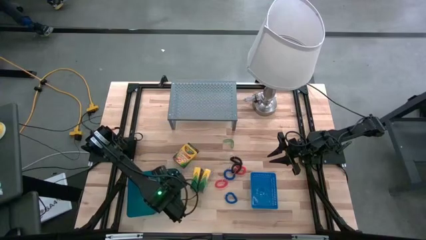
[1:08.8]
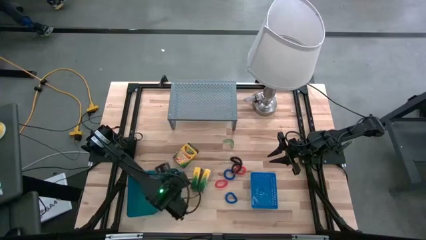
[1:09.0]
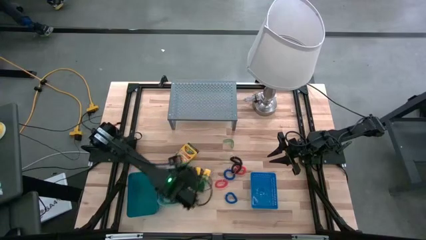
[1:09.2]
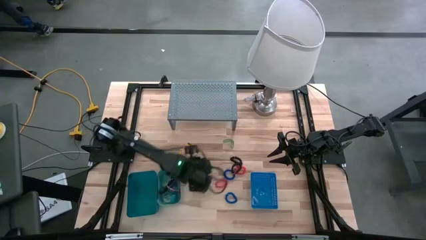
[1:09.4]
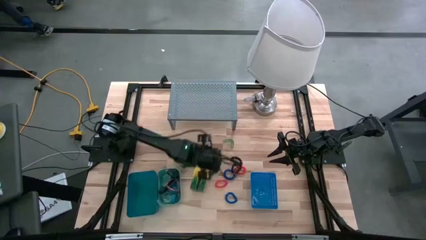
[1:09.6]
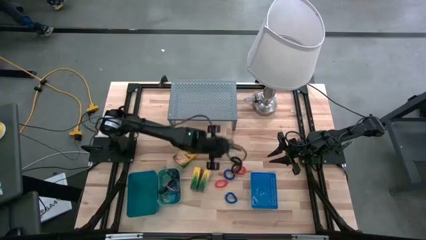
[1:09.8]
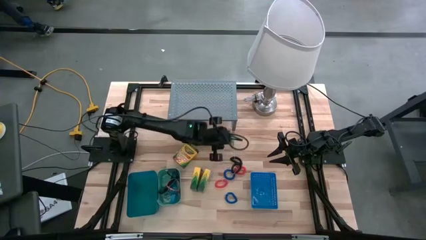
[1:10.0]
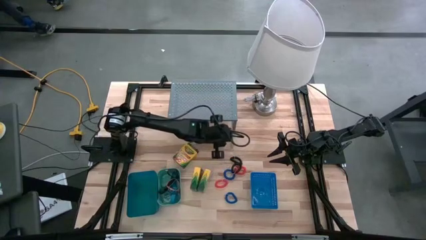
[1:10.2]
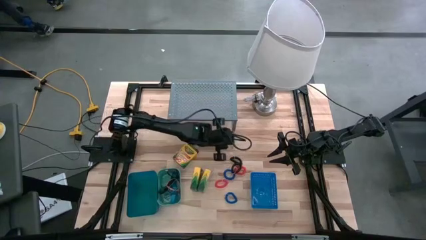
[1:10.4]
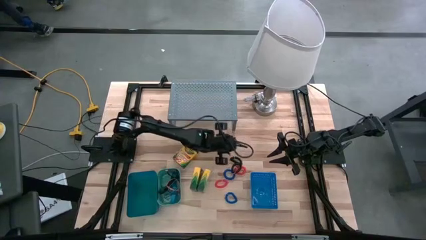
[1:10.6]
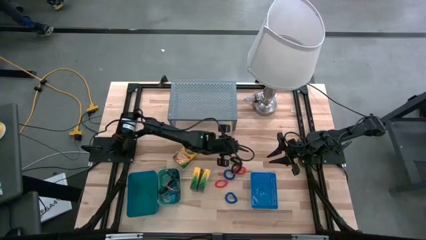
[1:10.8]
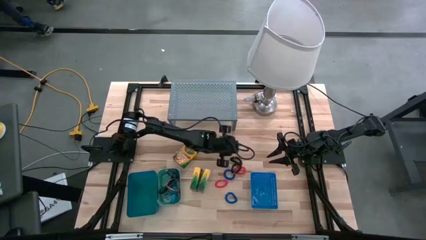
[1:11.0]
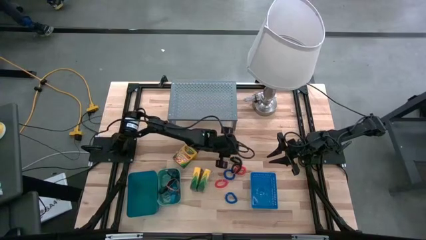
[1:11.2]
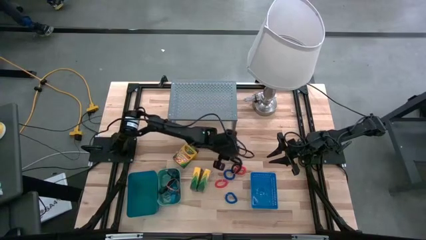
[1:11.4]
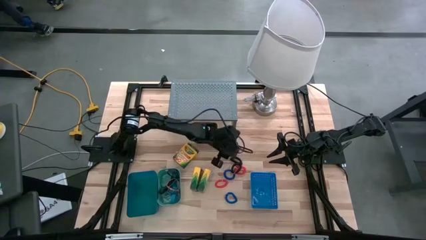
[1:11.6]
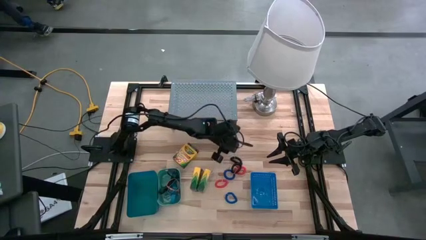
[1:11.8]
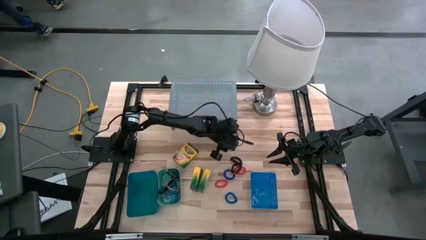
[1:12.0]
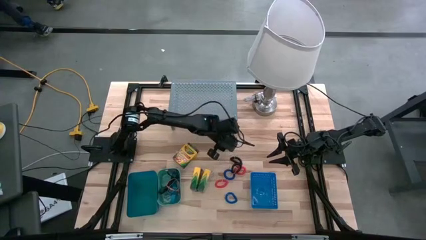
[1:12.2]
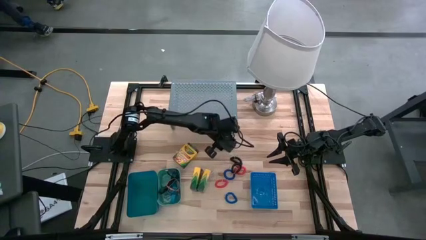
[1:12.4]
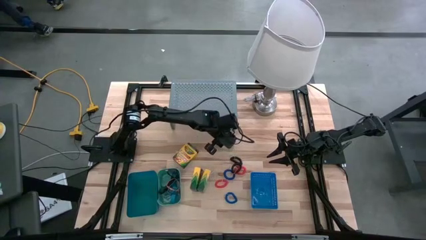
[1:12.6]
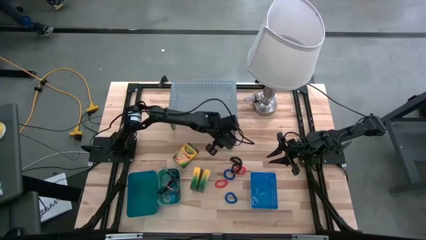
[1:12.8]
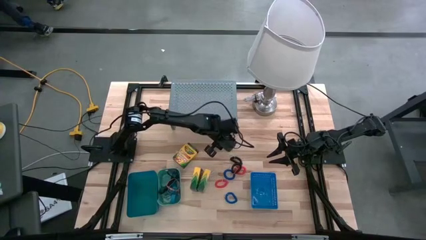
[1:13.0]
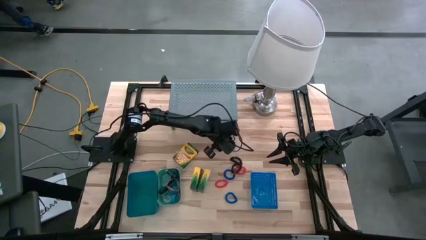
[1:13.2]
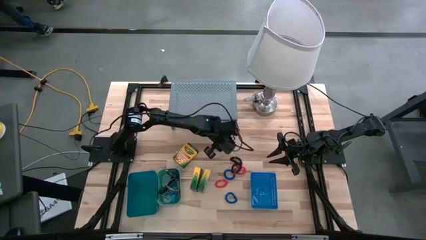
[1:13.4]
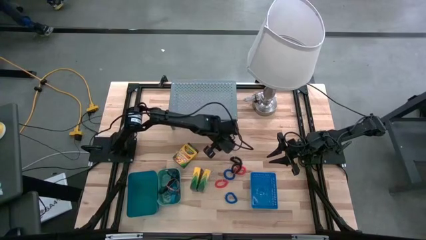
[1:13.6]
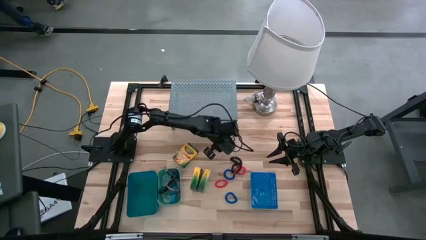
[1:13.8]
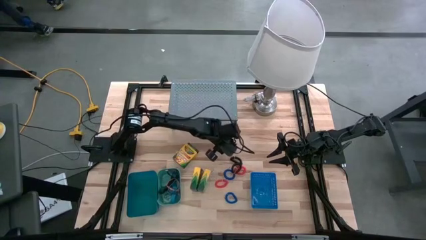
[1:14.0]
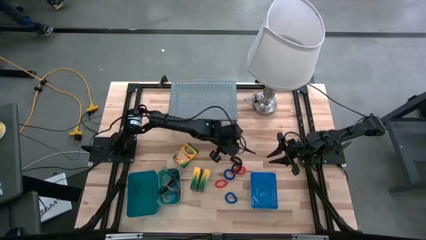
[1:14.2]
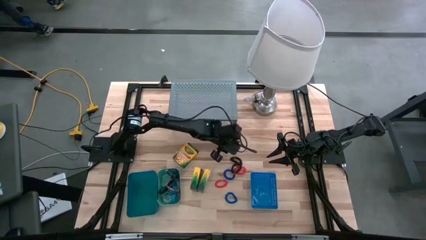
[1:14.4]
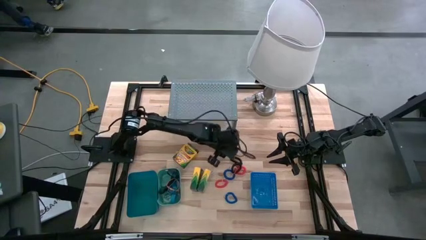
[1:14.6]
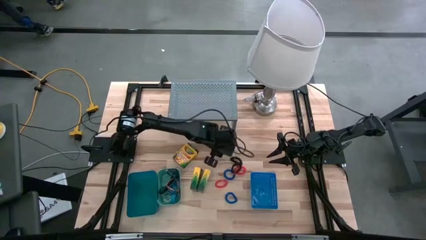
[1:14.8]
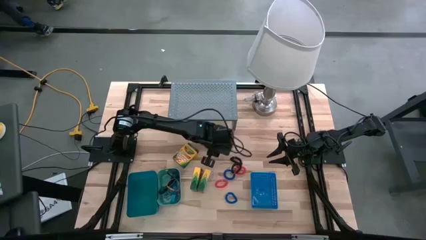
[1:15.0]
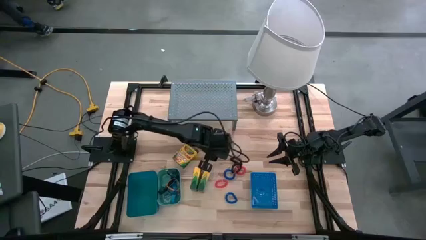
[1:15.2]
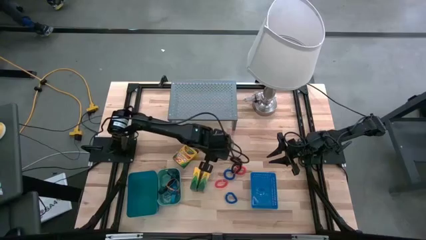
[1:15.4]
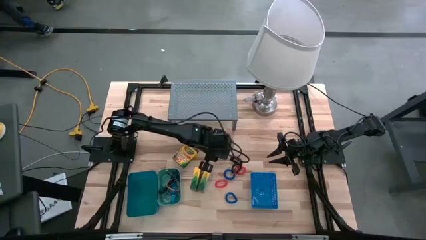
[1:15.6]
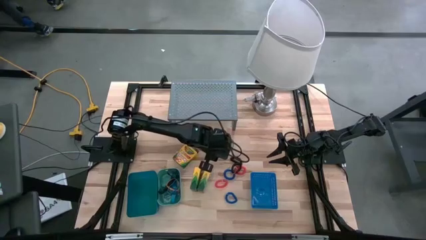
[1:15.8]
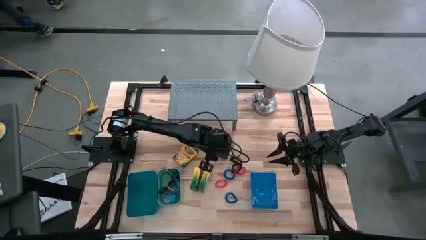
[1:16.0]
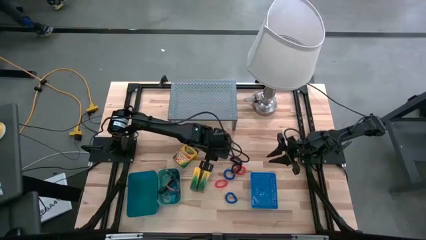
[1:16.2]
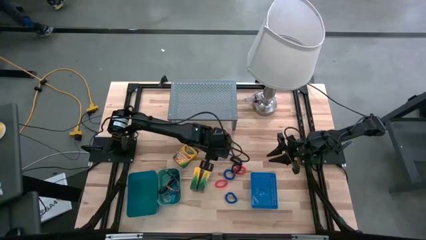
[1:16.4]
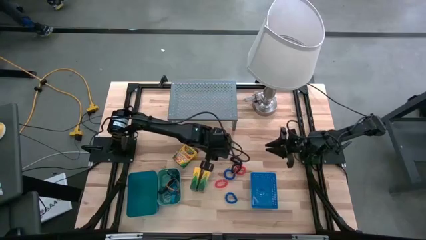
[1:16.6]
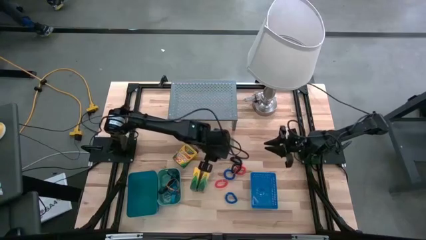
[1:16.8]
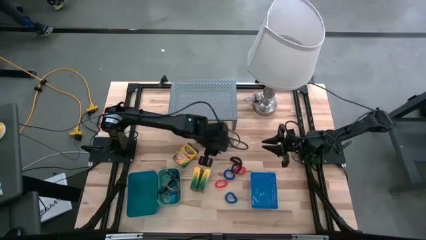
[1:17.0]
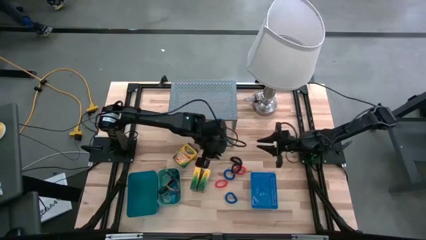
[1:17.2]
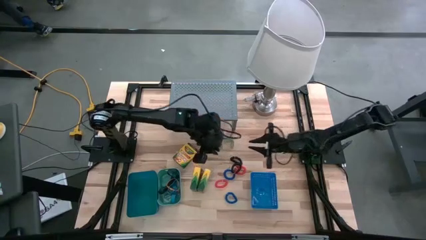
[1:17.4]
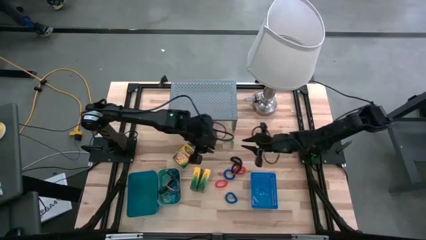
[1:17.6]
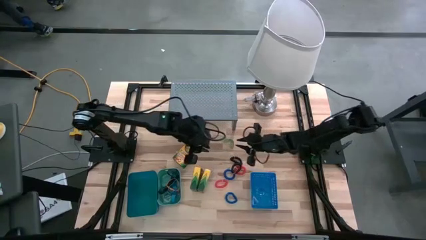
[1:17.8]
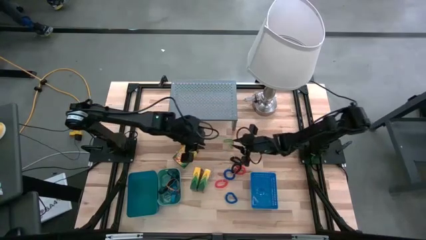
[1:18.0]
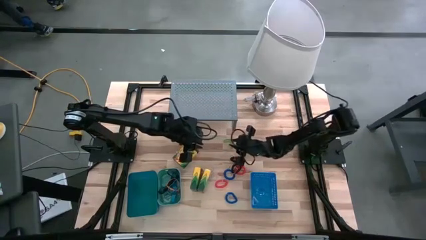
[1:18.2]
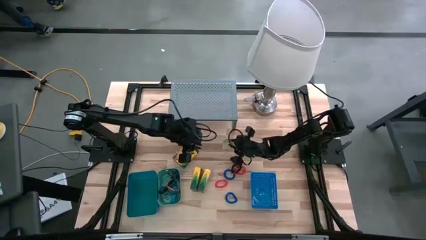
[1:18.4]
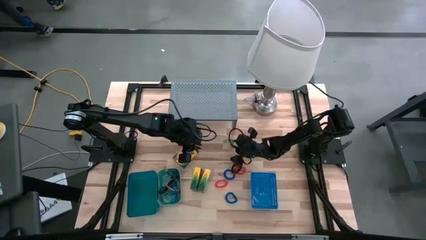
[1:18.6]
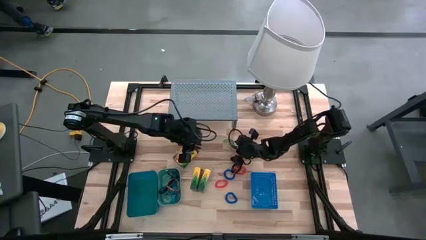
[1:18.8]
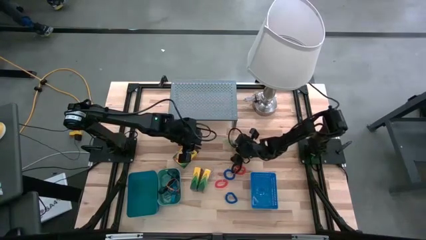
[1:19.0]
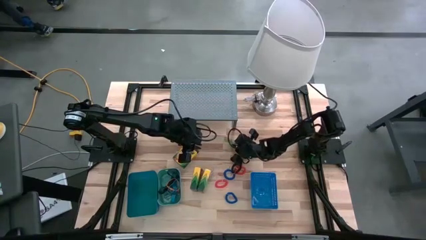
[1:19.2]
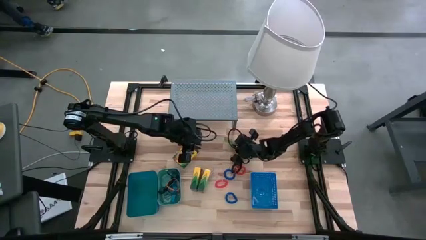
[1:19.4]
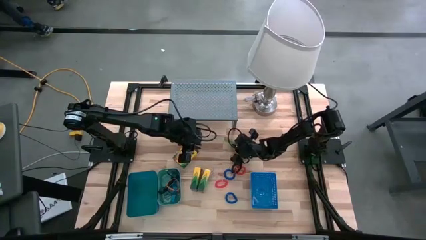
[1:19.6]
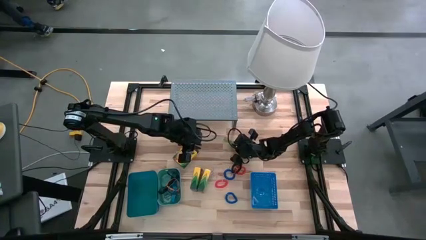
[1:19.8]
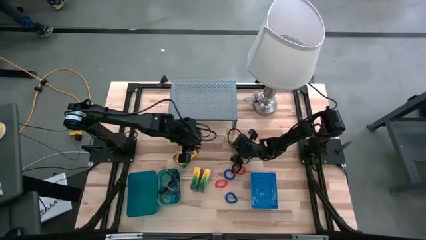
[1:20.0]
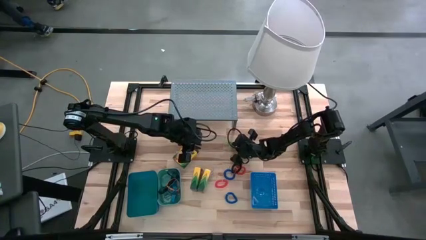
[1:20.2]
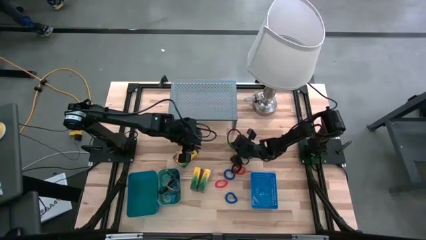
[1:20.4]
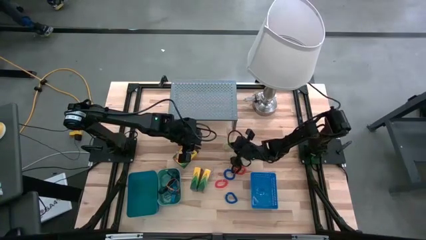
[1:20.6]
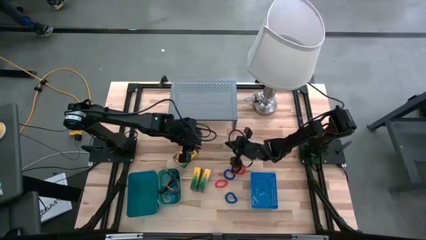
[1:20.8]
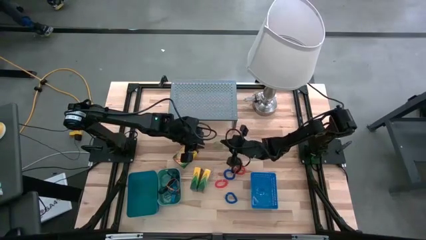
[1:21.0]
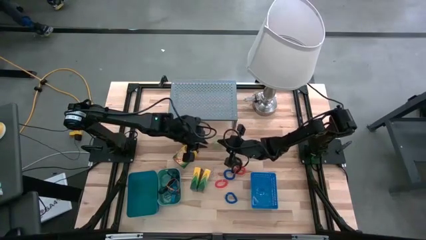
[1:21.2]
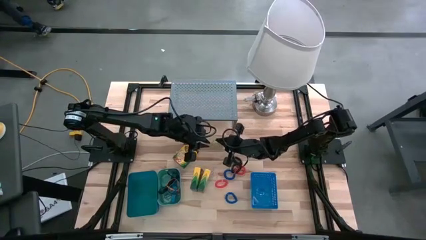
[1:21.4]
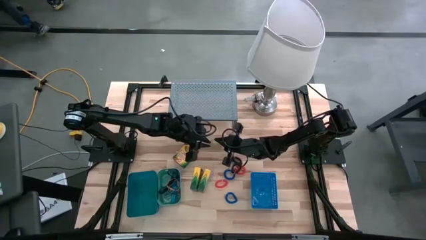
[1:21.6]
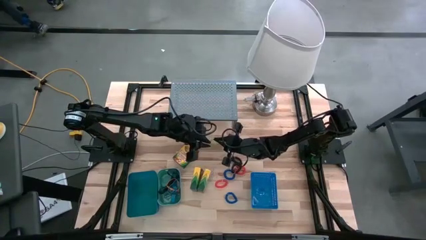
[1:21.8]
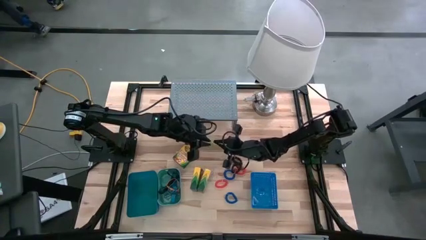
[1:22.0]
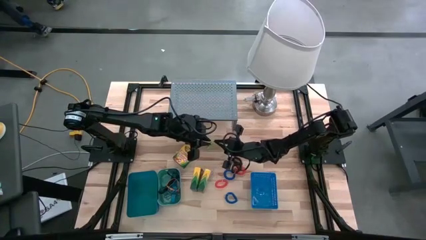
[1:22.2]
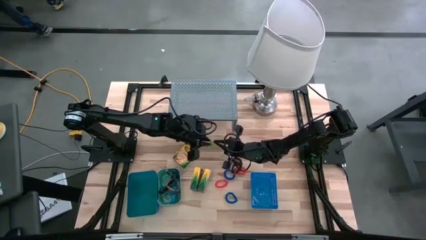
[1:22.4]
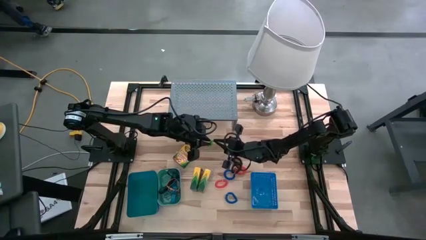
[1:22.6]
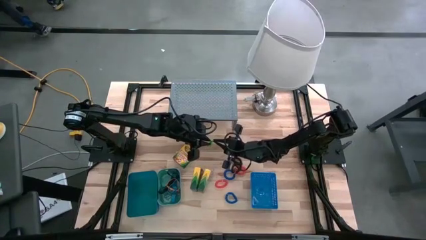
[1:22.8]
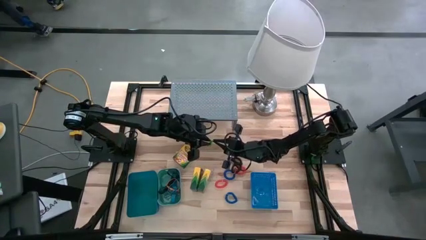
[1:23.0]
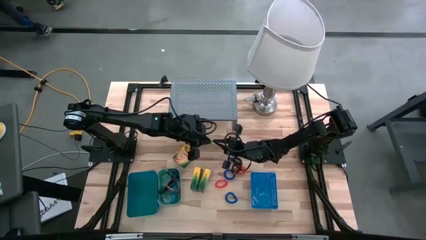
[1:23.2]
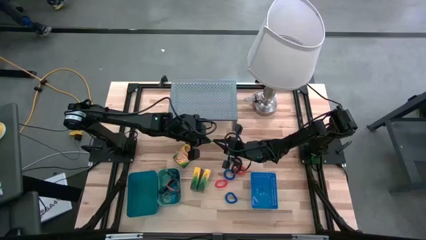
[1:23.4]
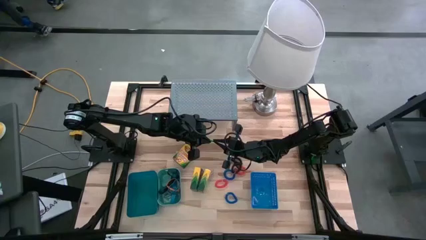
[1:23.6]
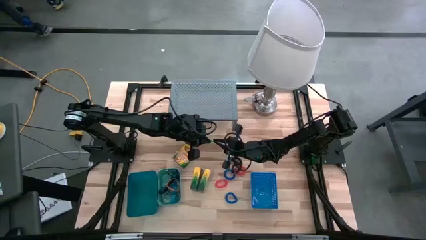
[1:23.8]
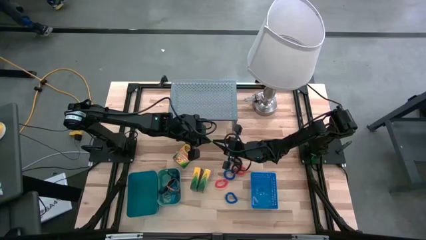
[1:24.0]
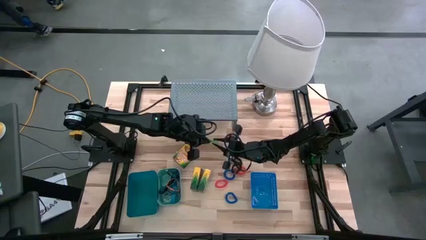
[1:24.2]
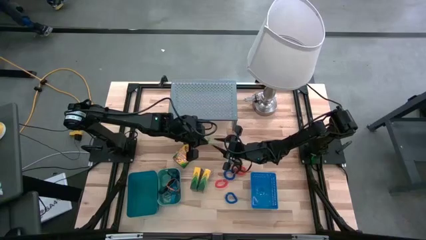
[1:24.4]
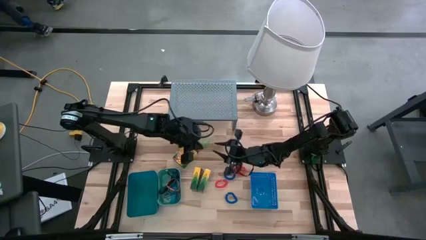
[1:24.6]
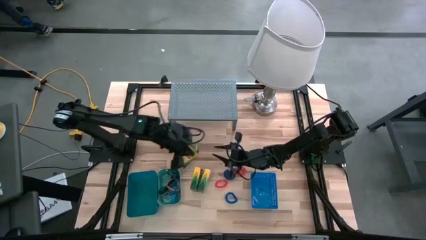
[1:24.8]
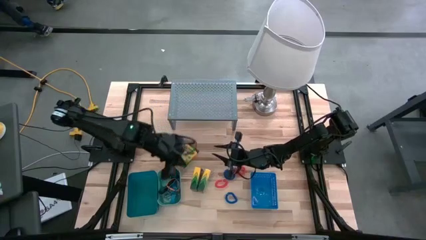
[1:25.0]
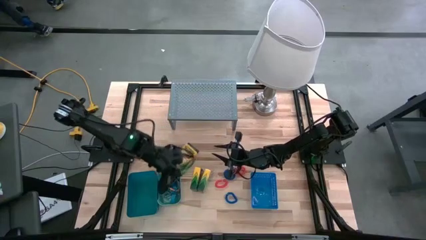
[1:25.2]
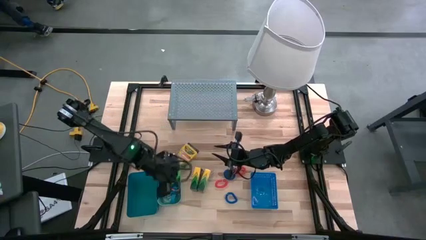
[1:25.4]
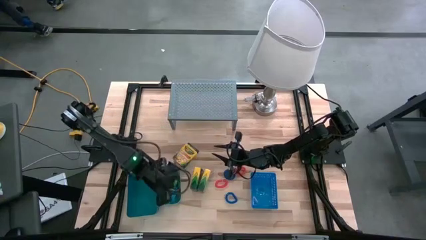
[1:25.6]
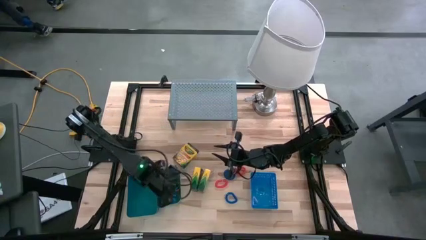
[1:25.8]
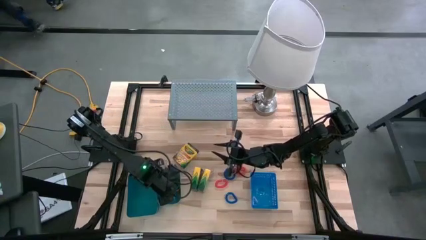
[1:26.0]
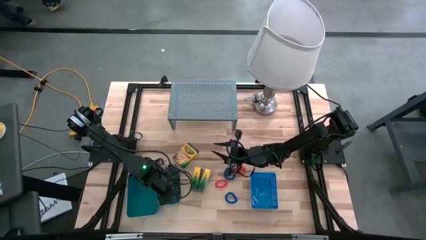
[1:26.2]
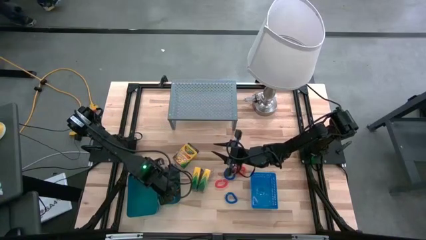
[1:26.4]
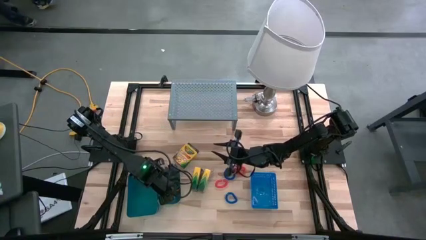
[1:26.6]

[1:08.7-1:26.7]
Task: Pick & Place Office Desk Supplies
Put the green rubber band into the green bin
